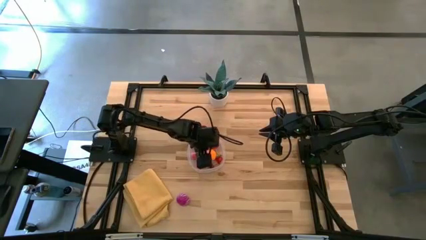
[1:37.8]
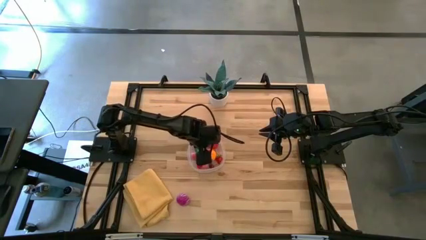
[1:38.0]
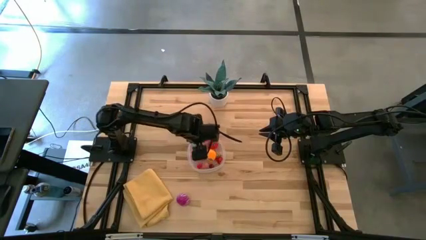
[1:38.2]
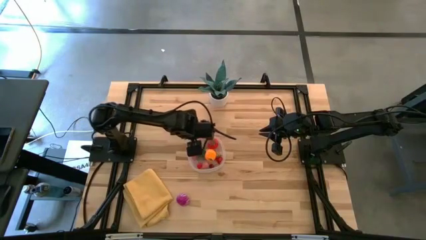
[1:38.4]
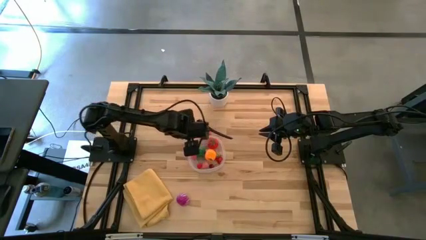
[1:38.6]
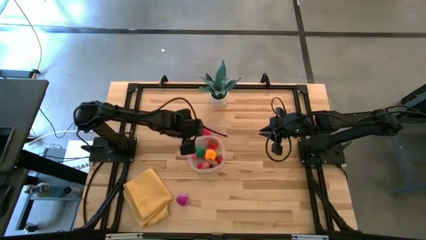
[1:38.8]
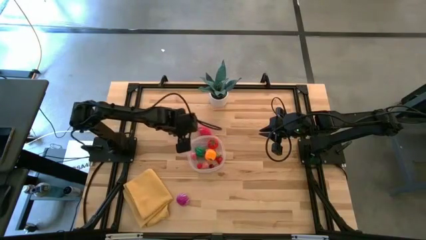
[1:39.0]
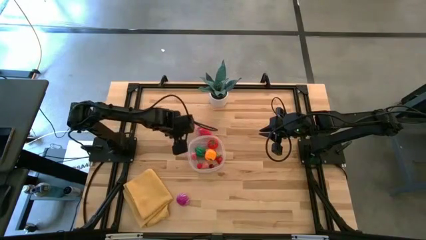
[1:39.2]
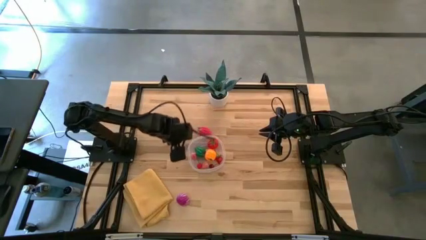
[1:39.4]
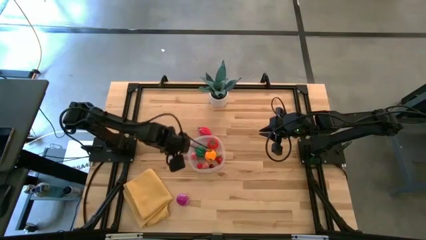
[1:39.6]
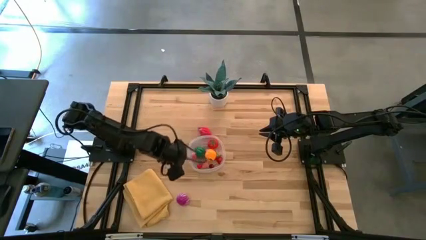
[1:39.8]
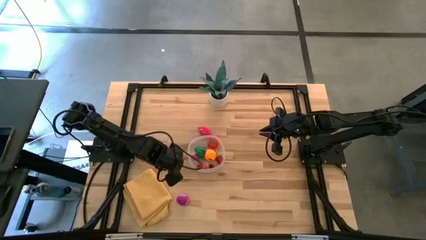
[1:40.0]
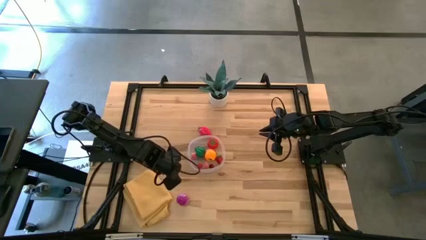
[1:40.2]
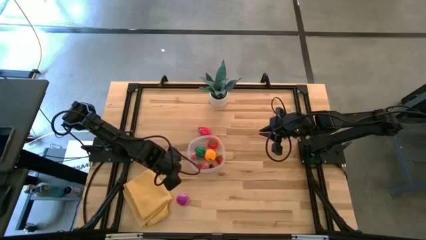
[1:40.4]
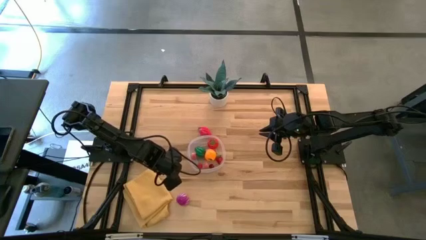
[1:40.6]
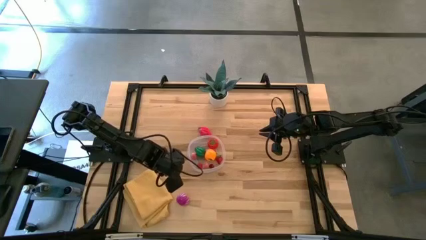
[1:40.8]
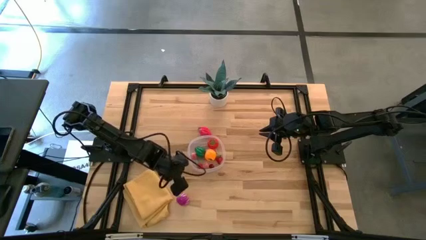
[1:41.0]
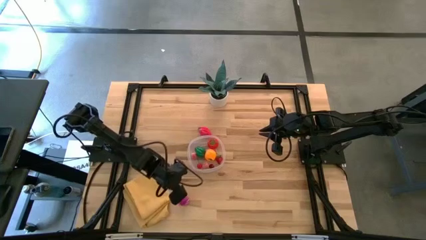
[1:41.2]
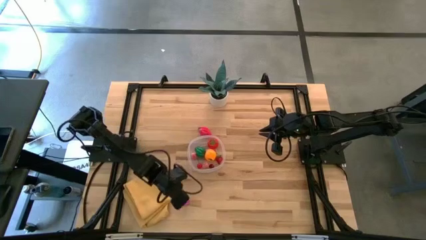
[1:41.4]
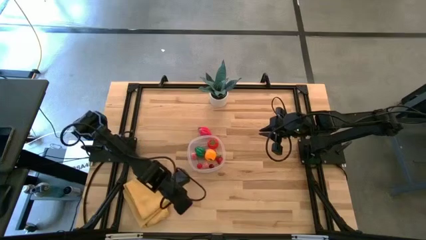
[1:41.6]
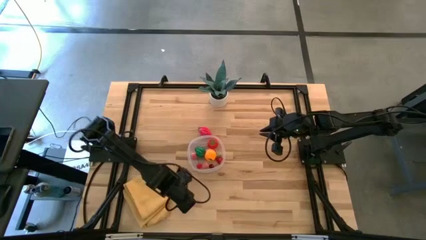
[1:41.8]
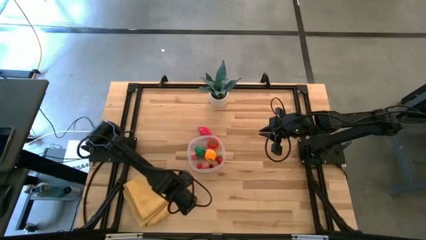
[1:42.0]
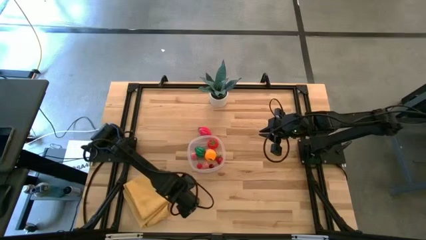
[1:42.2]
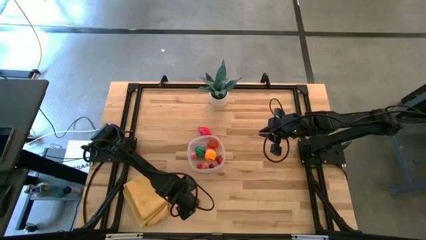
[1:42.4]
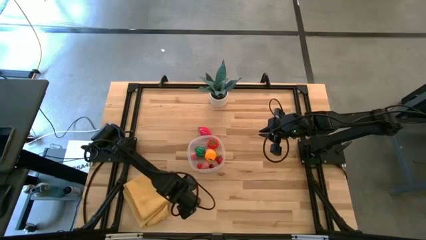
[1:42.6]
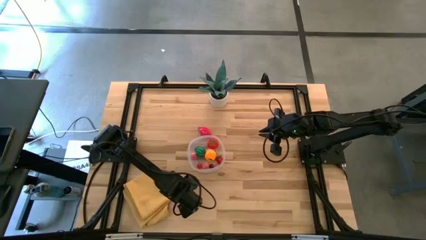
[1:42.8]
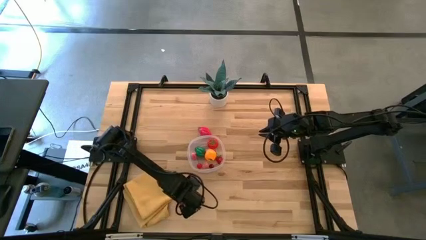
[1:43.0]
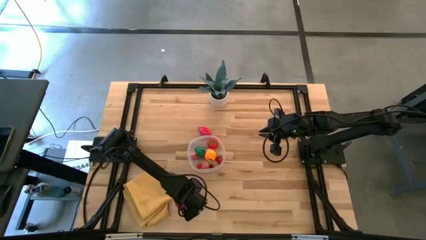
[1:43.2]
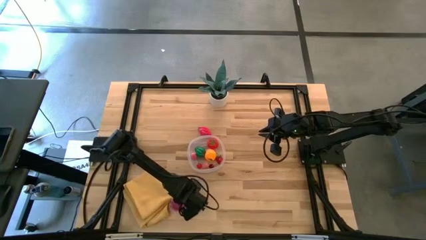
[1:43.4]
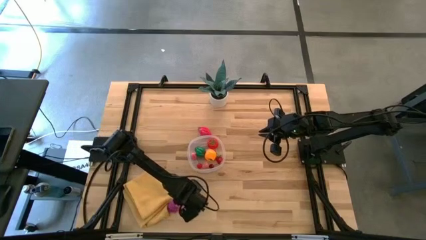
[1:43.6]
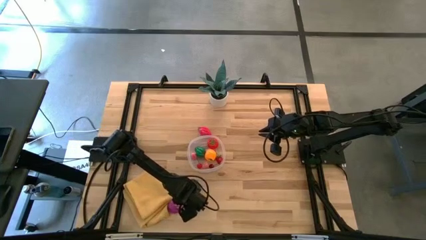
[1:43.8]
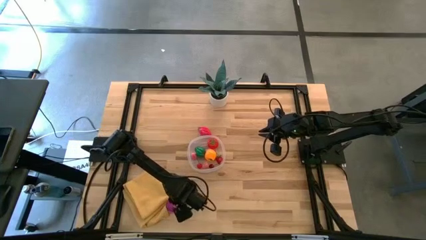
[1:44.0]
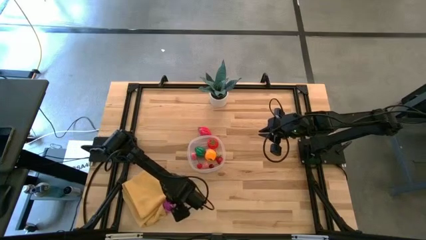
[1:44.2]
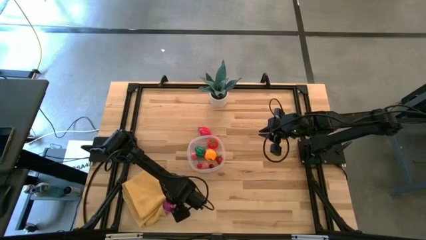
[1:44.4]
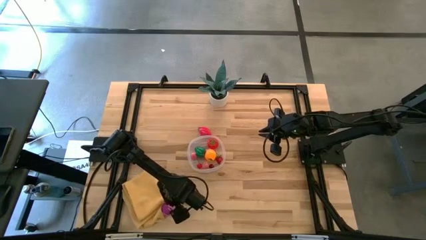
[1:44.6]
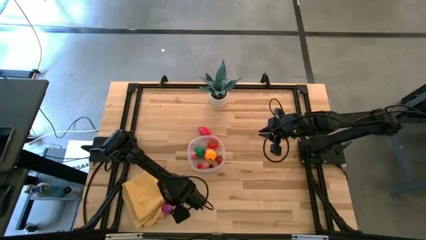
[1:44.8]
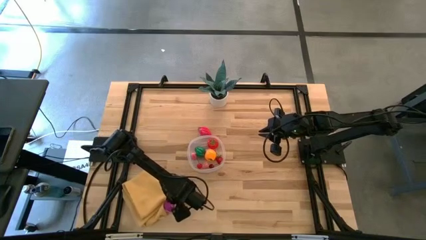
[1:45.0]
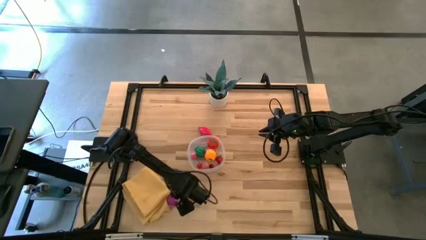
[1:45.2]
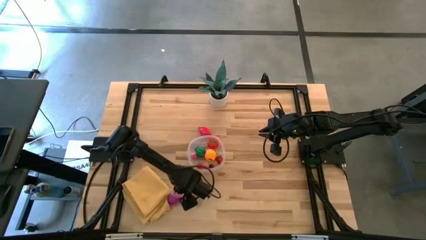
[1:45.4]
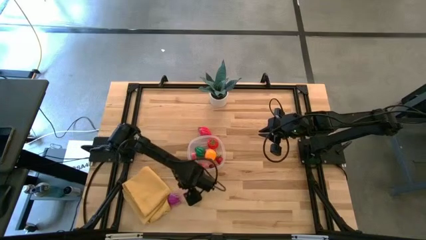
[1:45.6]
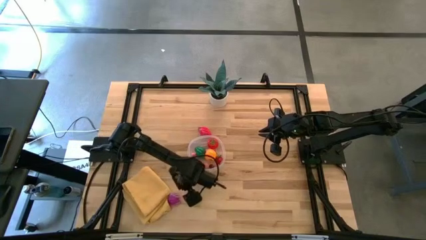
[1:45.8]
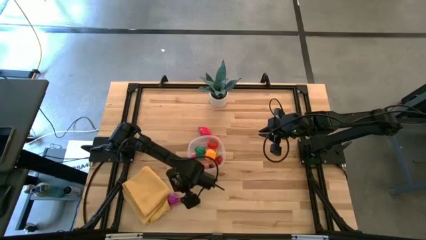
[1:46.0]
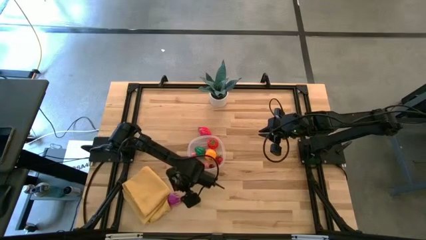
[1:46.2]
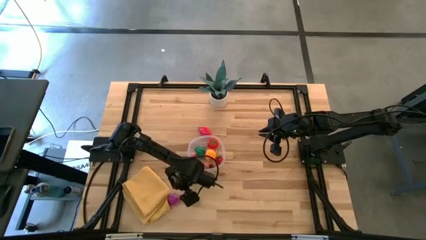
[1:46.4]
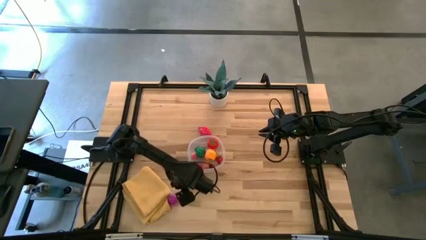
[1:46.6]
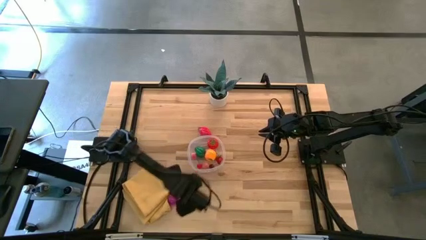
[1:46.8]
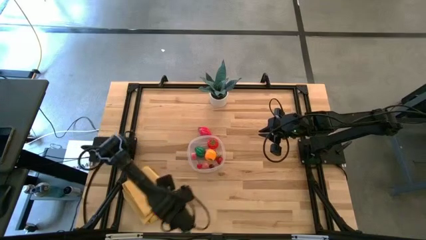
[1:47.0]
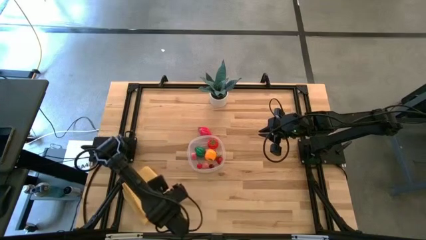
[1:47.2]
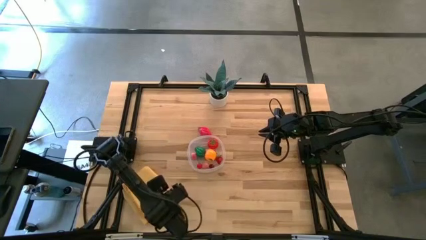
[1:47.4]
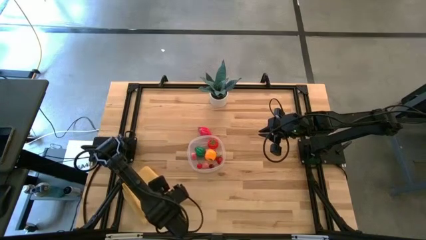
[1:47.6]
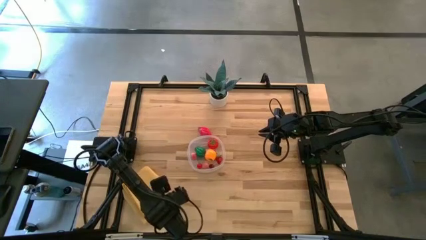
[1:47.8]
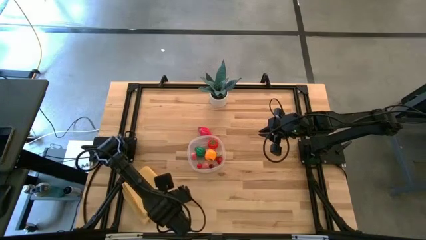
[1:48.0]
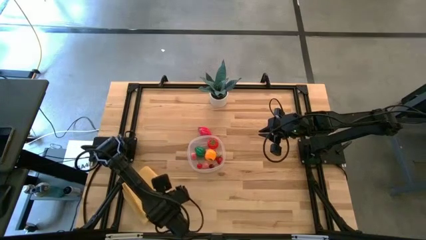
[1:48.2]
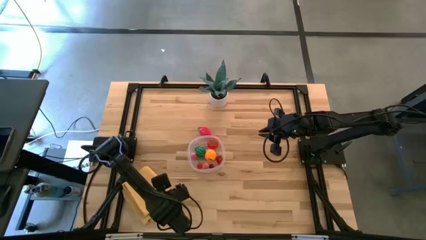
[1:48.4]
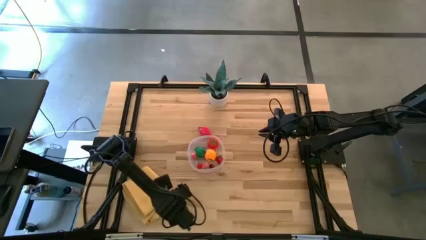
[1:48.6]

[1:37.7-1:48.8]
Task: Pick and placing Produce into tupperware
Put the violet onion into the transparent bin

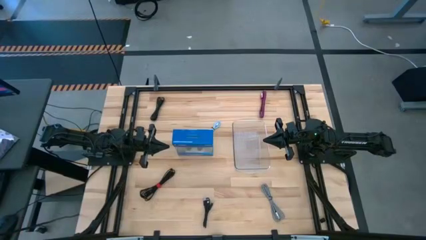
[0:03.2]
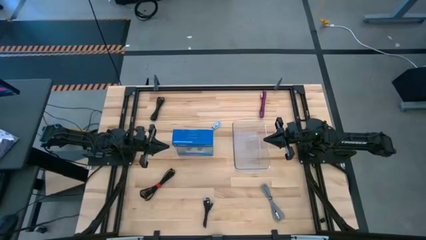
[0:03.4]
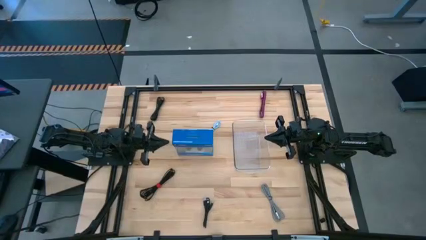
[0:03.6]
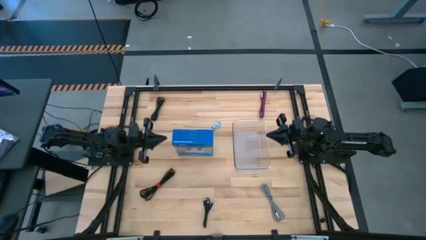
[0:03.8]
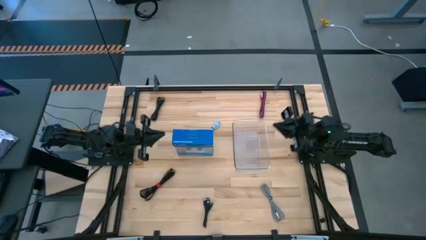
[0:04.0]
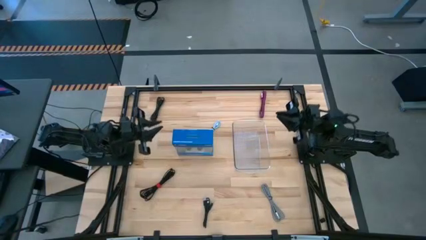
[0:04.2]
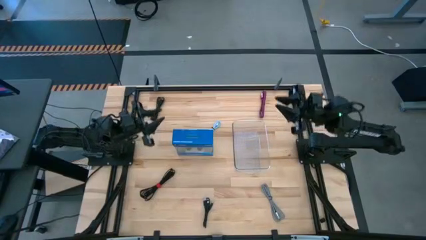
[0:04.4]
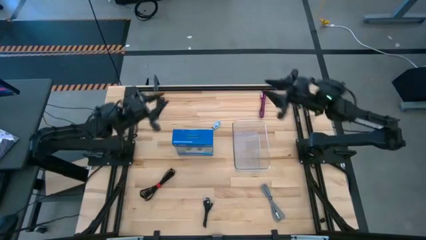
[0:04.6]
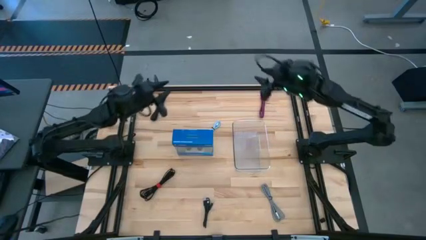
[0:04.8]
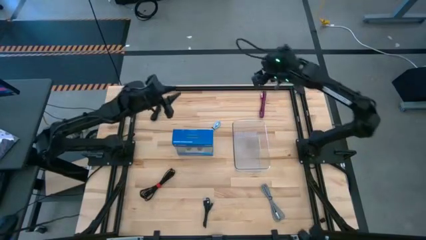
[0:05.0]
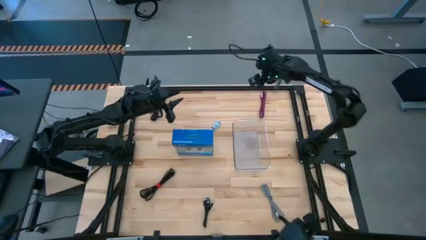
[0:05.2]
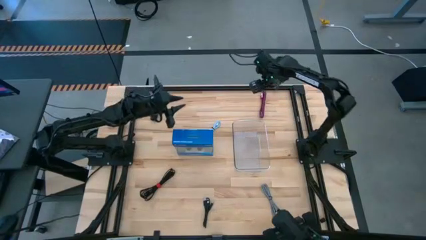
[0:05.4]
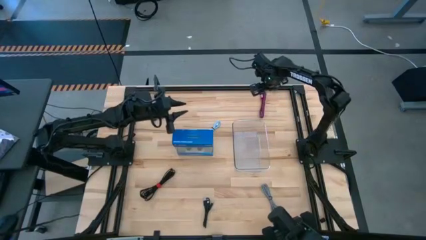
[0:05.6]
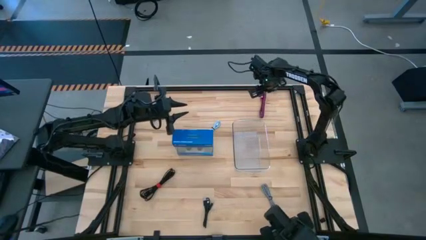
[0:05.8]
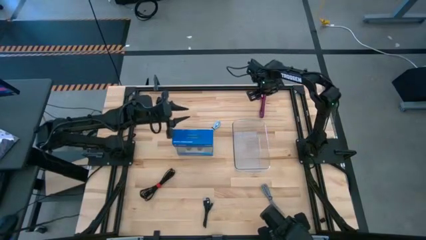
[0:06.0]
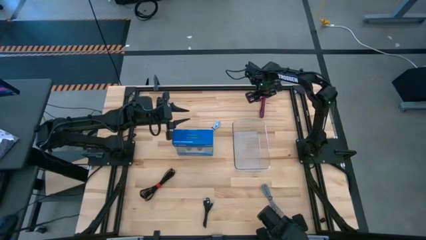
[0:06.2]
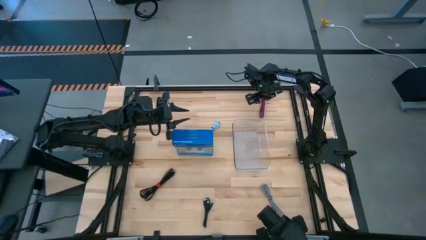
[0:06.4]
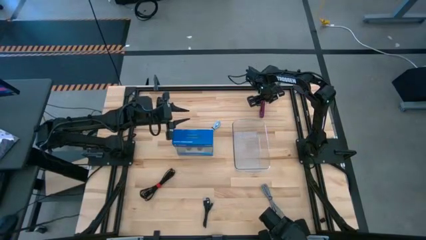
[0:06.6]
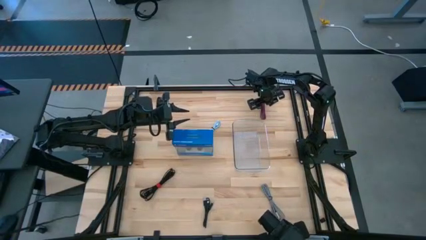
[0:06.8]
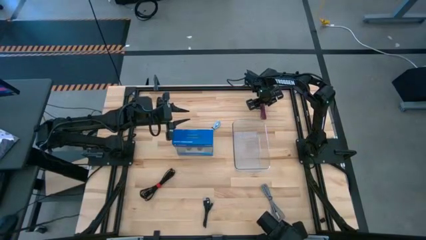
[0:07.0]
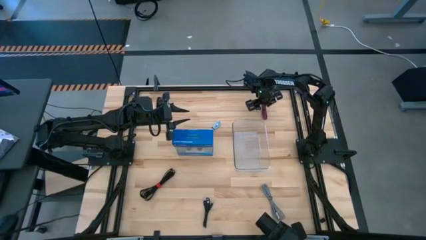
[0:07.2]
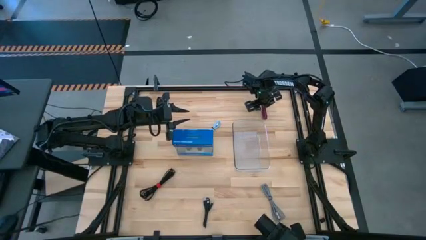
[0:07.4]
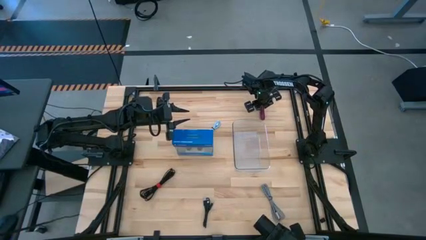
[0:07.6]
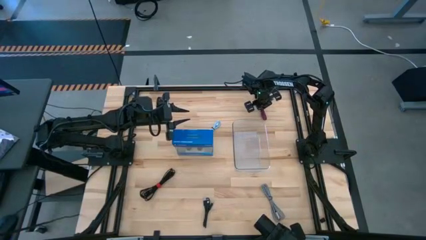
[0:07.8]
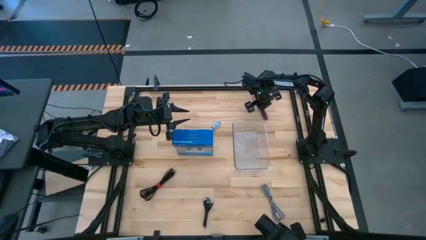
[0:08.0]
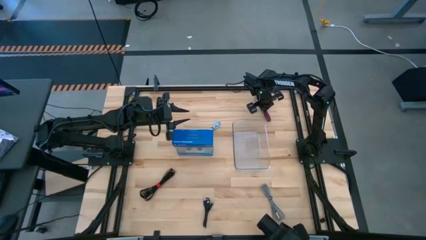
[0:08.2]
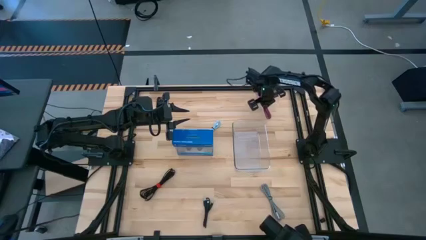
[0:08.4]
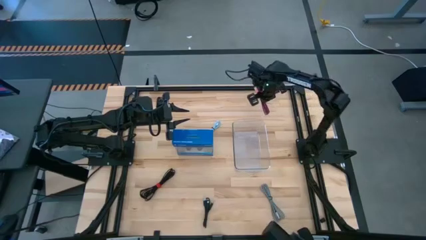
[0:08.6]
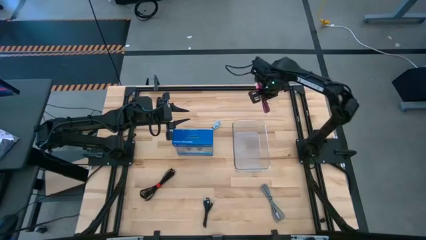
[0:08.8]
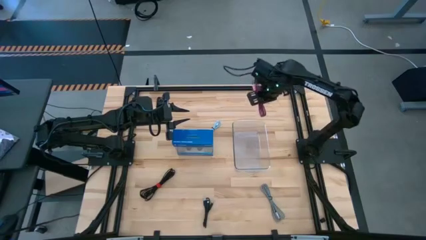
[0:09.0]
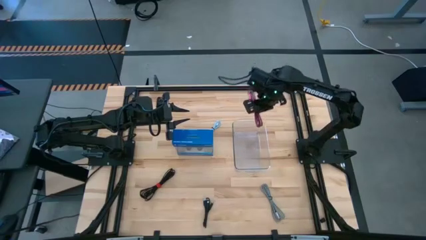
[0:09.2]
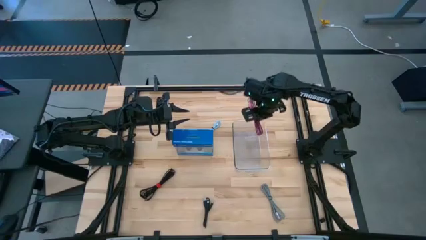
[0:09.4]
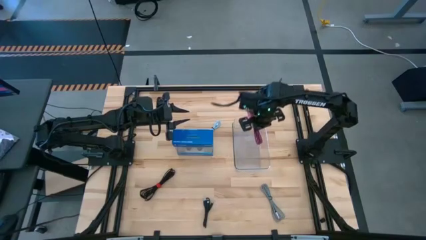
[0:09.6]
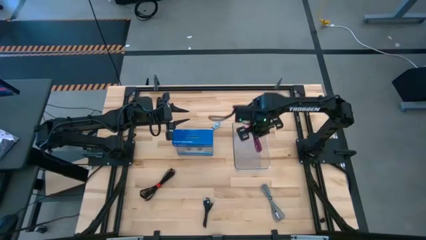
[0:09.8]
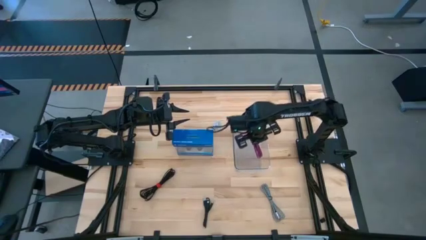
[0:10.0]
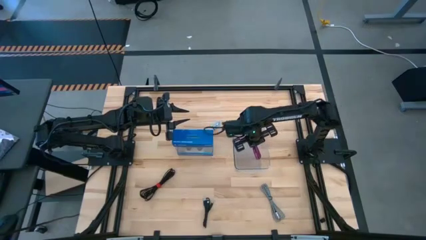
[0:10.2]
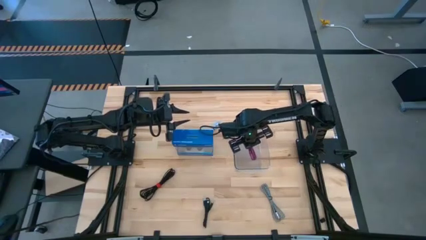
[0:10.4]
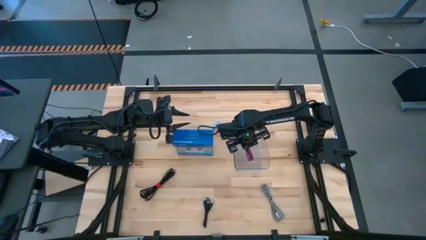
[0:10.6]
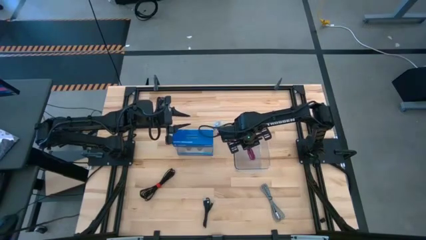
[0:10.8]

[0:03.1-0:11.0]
Task: Pick and place USB-C Cables
Put the pink black charger cable into the transparent bin
